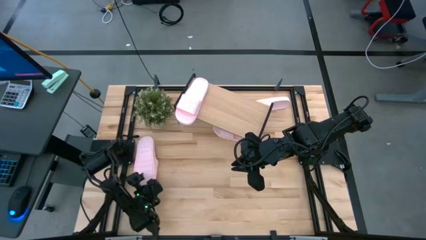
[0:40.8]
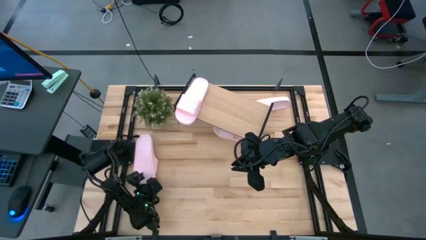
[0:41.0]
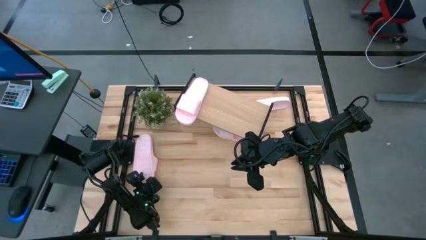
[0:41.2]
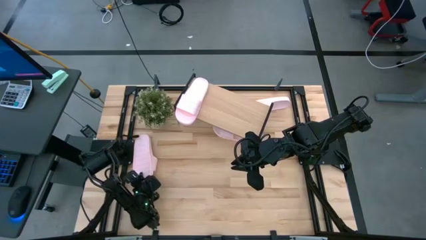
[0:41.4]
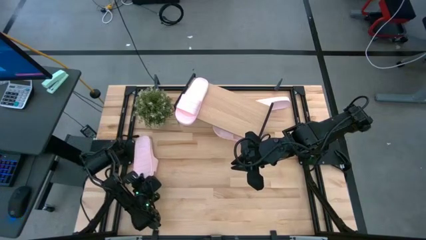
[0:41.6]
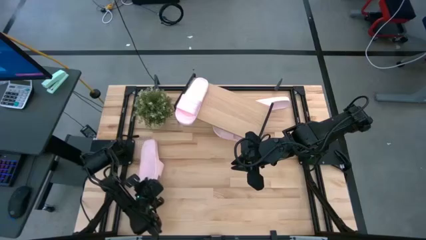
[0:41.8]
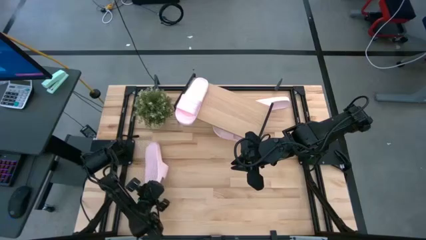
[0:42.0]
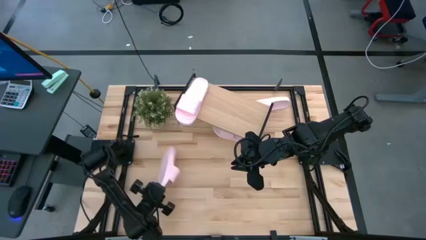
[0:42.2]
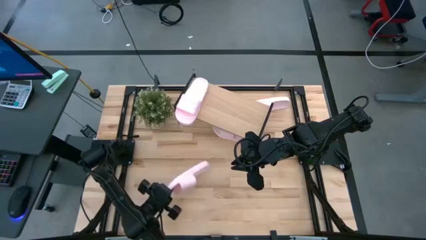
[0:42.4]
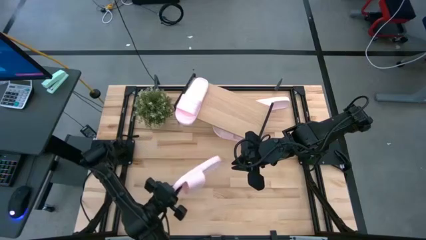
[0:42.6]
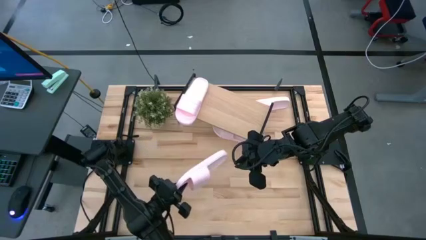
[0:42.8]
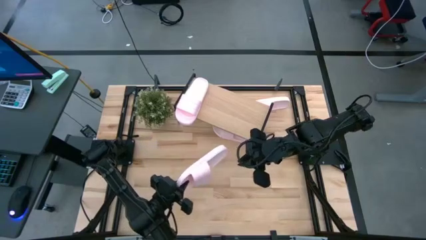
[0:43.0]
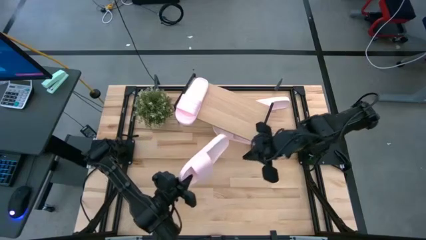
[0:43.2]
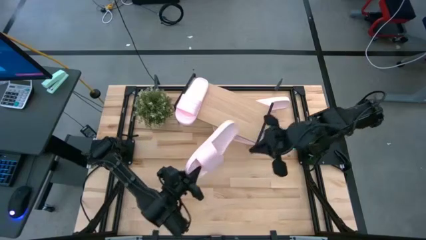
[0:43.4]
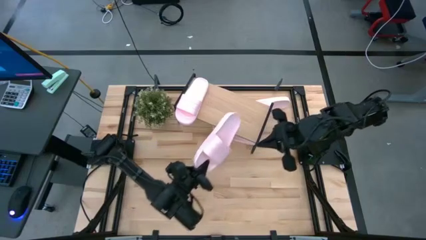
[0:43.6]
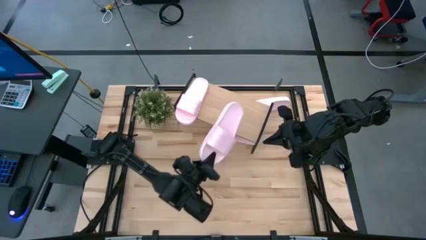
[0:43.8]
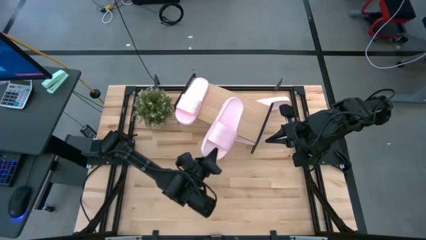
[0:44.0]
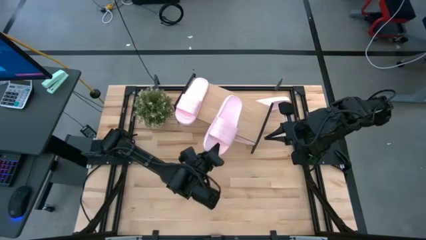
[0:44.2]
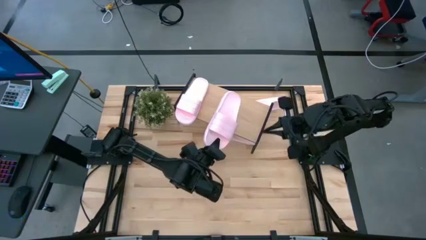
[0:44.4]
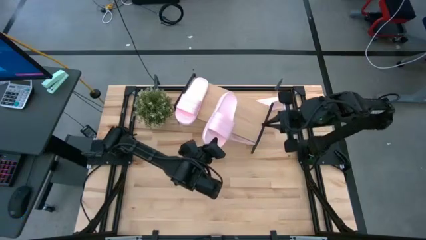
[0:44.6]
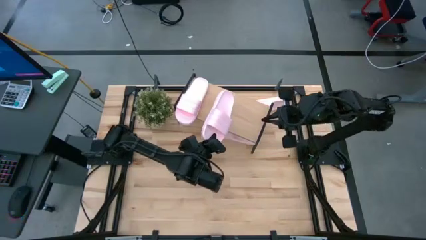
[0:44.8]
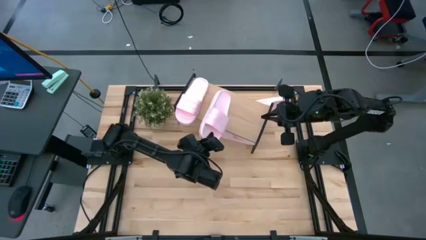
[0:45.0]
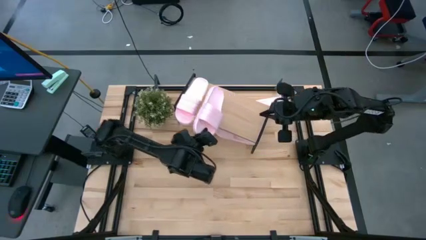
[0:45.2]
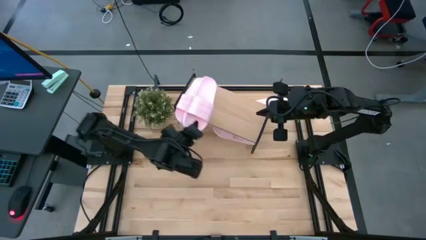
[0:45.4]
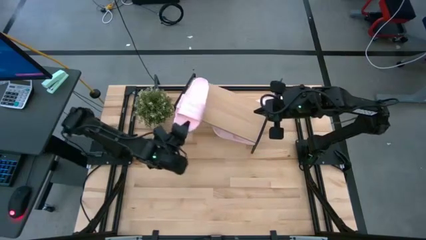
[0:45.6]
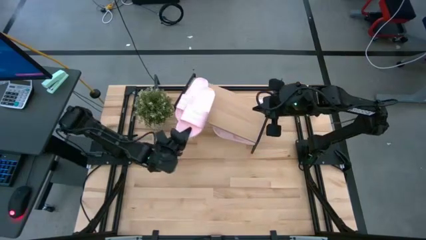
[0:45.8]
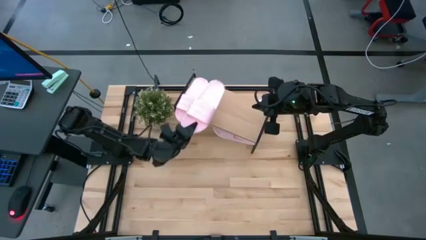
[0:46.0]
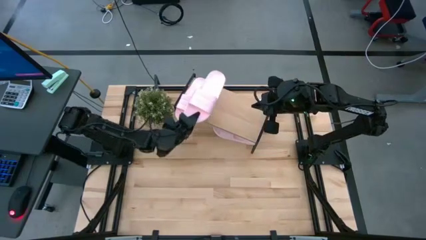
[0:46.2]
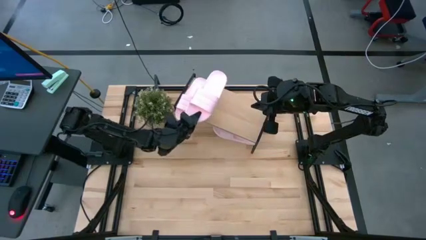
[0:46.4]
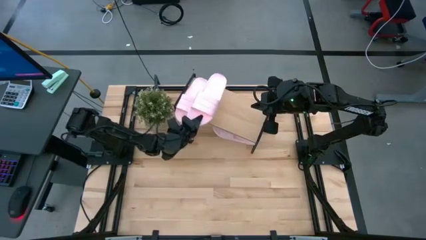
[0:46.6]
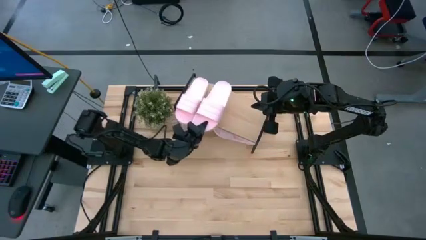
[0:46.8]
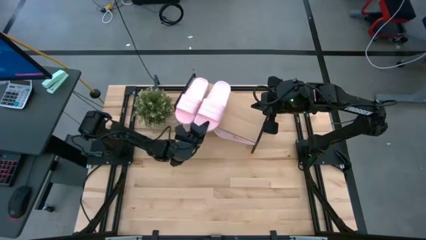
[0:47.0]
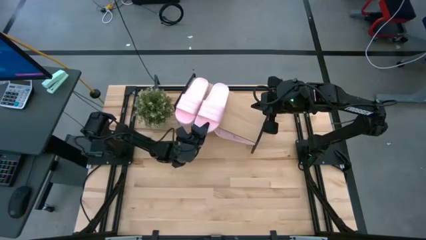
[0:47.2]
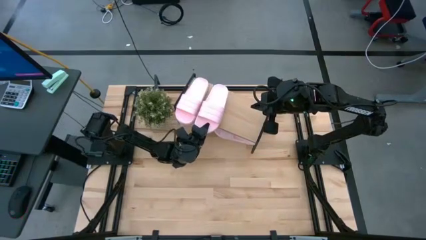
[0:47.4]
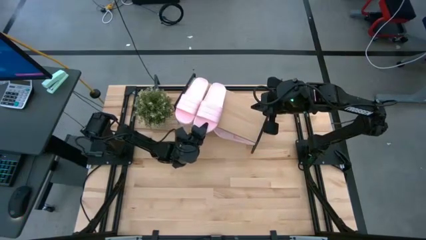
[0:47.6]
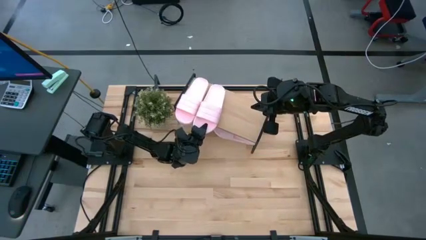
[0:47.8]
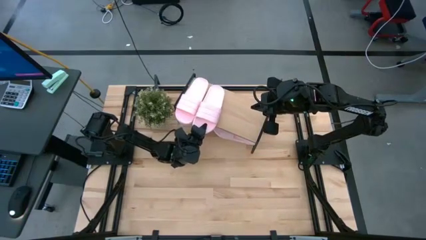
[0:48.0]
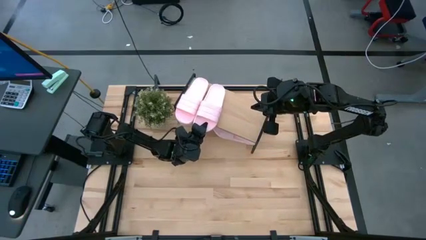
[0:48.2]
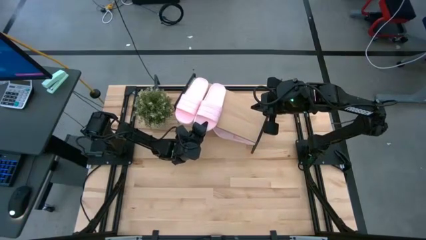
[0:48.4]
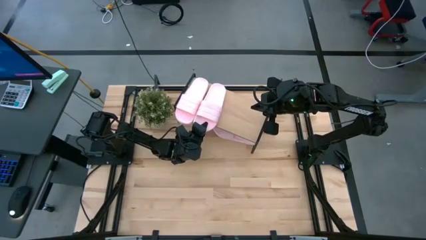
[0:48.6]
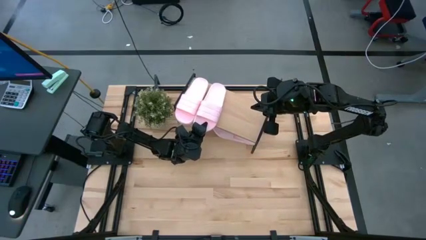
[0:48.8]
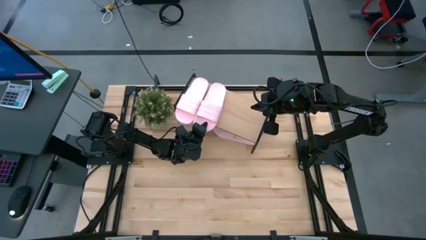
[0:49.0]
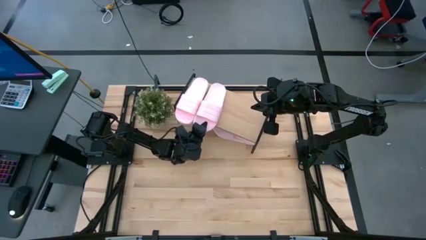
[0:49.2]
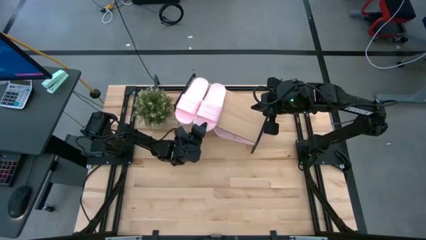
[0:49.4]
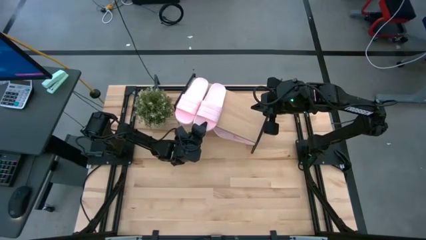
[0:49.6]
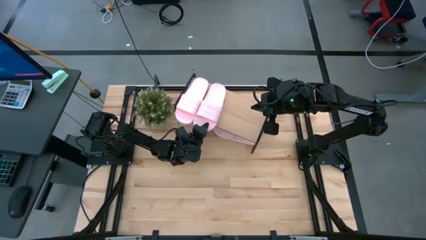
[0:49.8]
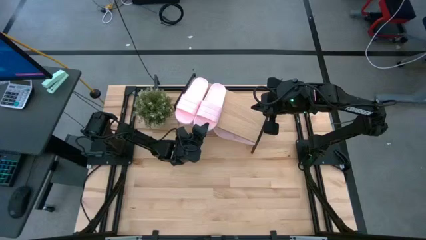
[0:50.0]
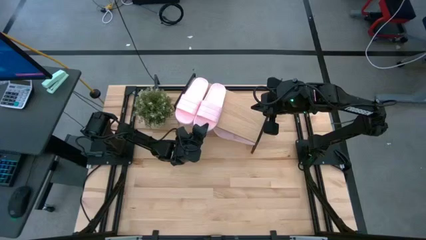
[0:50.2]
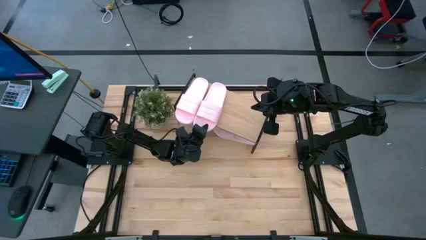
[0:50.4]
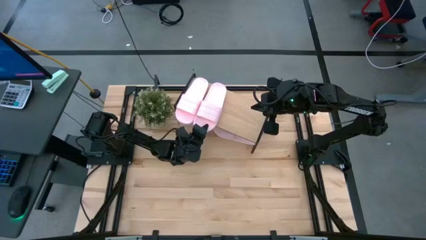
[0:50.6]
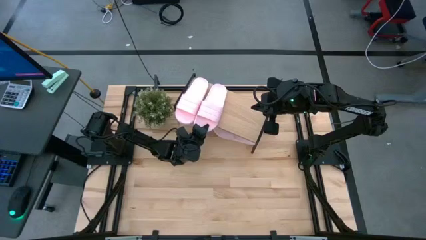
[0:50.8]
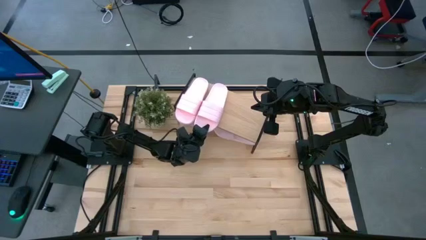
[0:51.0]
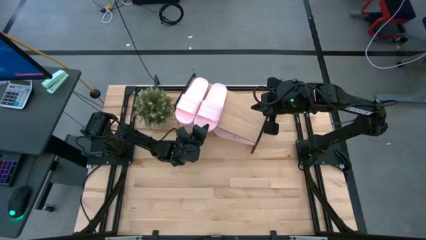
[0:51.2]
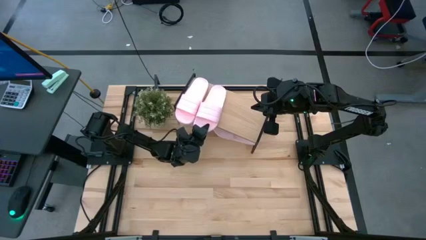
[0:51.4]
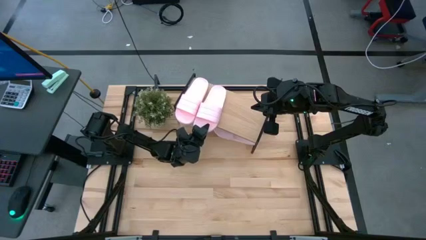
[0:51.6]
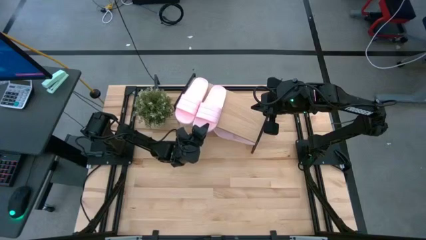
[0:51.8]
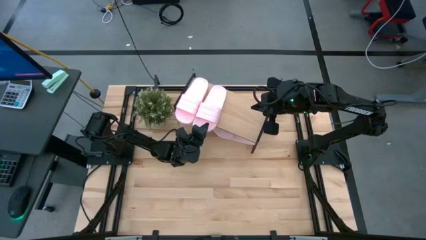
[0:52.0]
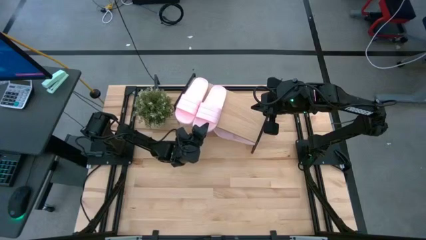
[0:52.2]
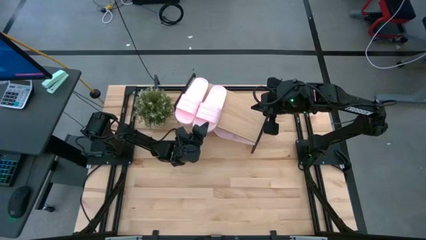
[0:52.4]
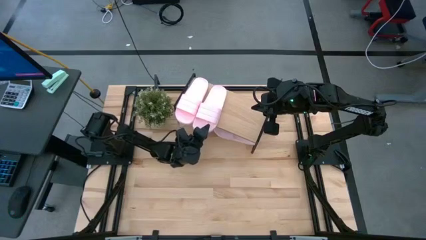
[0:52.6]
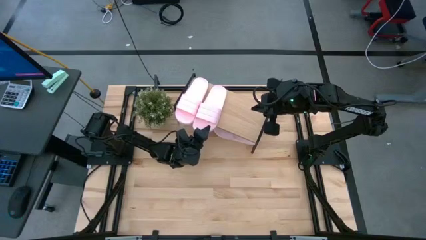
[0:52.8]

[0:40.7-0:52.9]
Task: Pick and place slides into the shelf
Put the pink slide on the shelf
